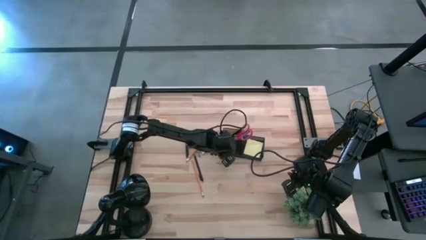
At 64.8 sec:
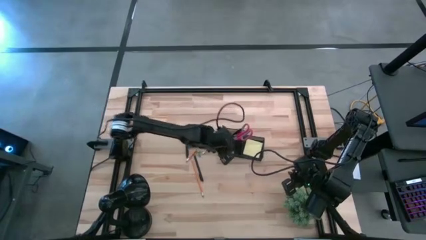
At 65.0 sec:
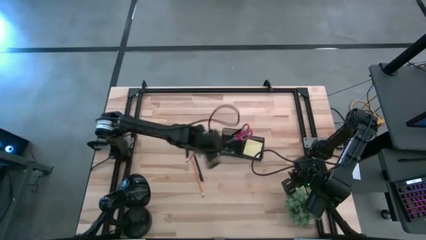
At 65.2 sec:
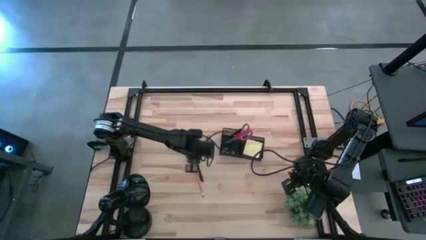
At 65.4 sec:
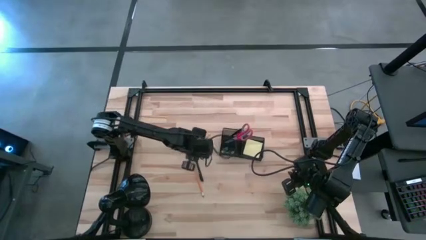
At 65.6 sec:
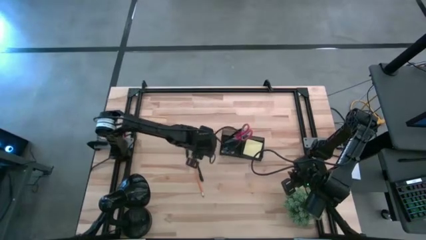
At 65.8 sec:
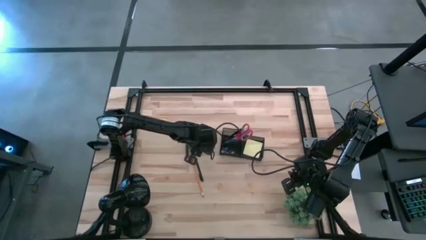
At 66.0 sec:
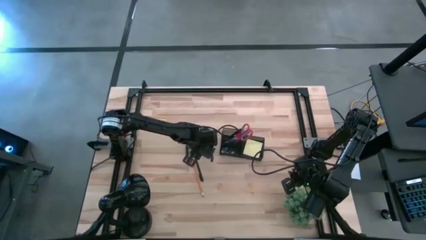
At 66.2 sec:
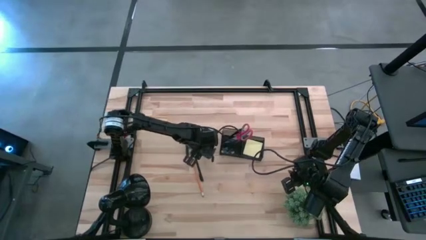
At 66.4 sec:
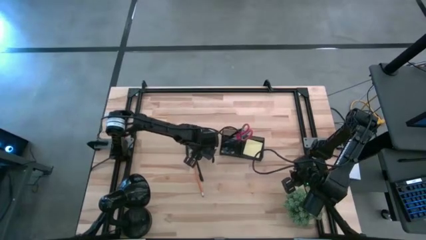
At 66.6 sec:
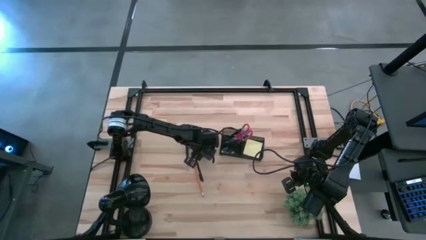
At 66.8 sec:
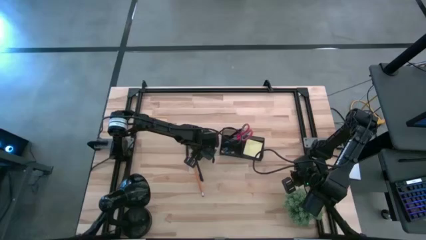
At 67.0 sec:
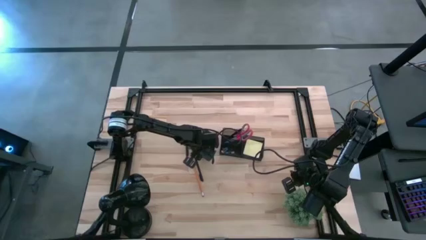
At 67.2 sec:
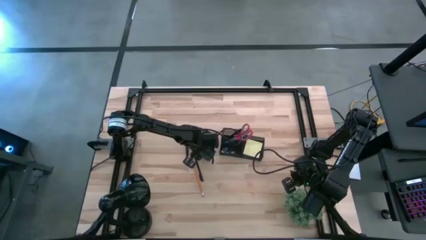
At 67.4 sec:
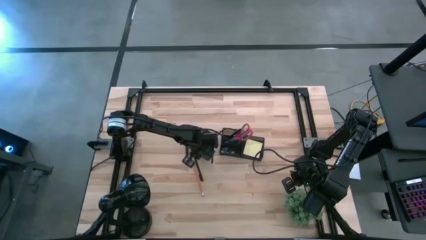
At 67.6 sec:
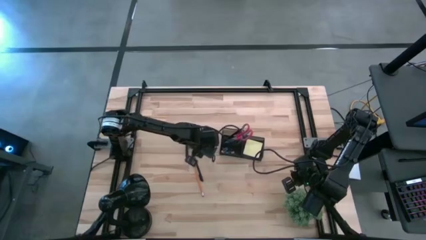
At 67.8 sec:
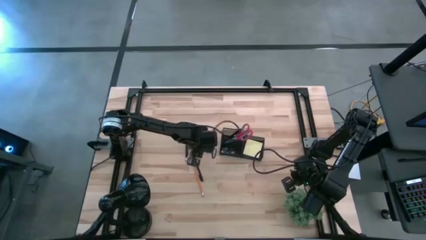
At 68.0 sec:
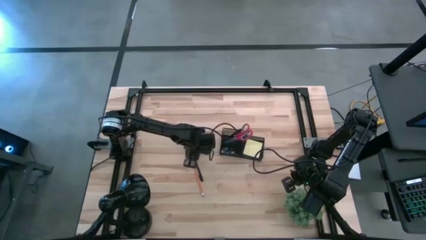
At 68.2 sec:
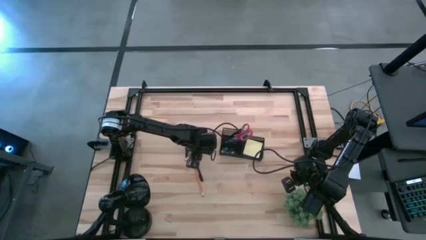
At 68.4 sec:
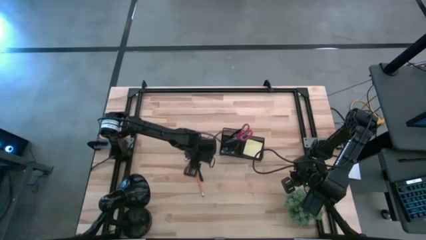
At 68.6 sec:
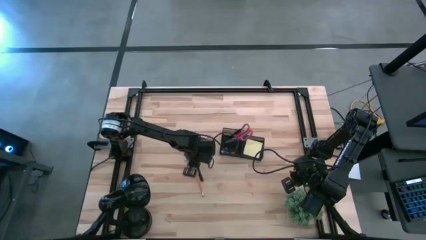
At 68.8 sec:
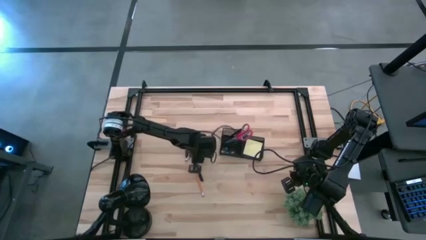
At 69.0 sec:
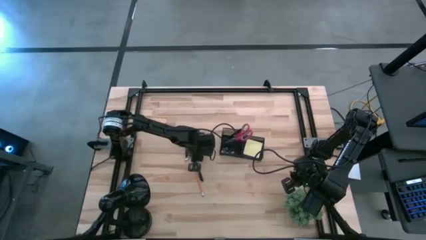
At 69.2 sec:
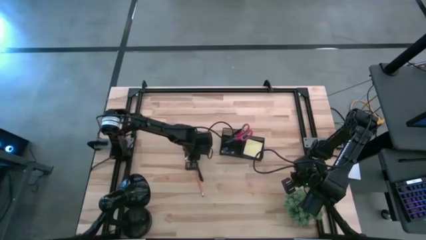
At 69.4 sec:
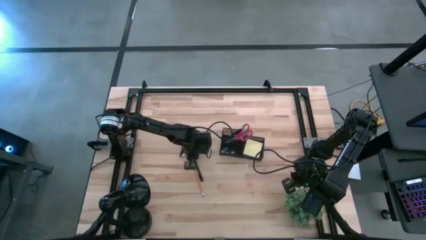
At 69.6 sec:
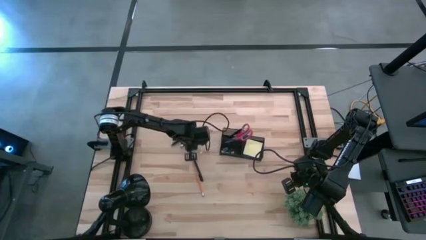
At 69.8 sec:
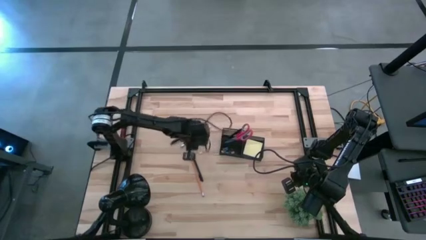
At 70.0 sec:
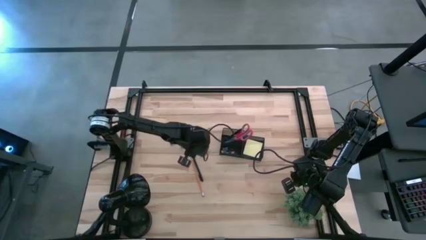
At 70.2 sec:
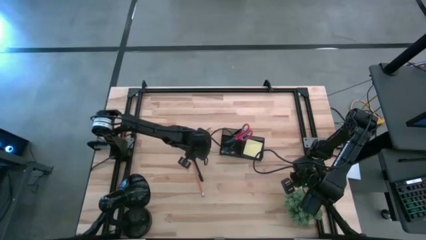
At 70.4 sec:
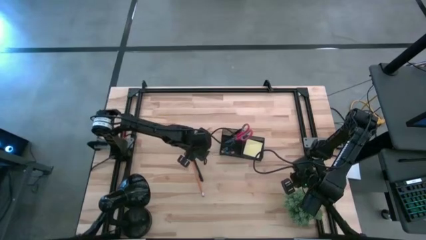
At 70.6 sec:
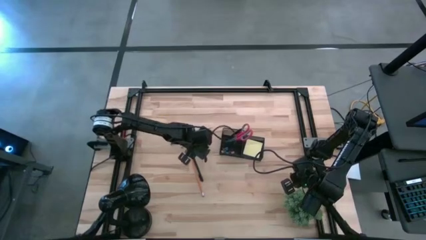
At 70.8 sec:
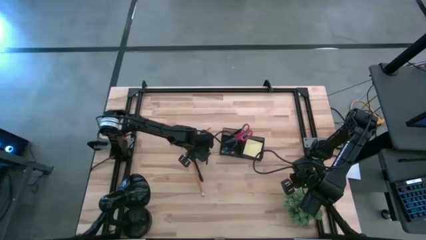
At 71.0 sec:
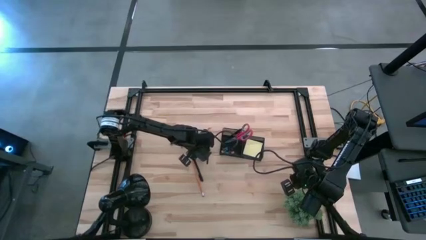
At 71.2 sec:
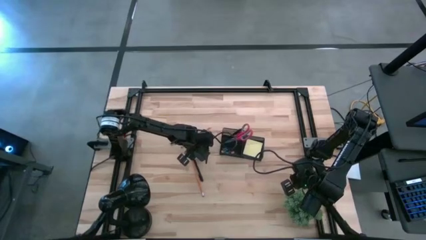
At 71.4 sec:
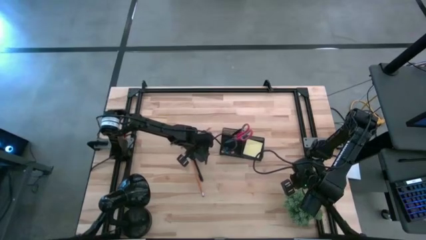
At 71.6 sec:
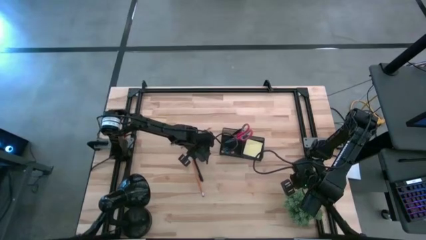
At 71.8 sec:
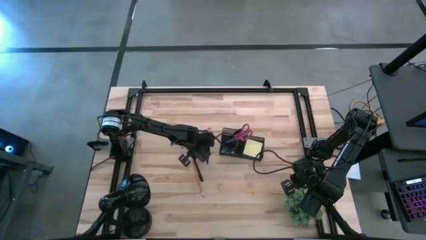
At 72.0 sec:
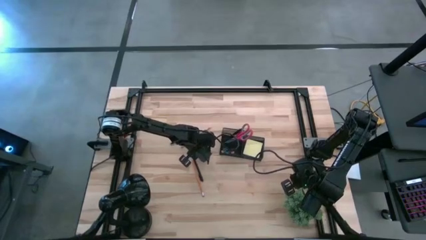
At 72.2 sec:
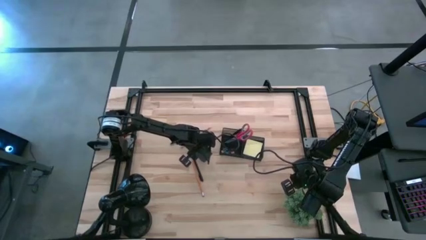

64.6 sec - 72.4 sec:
Task: Pick and place office supplies into organizer
Put the right yellow binder clip into the desk organizer

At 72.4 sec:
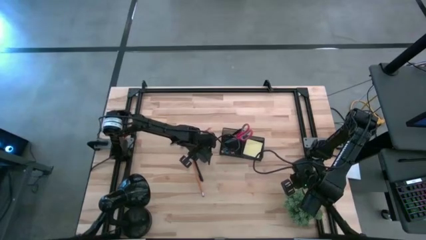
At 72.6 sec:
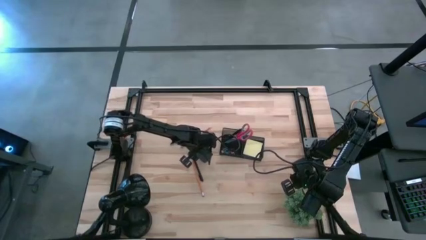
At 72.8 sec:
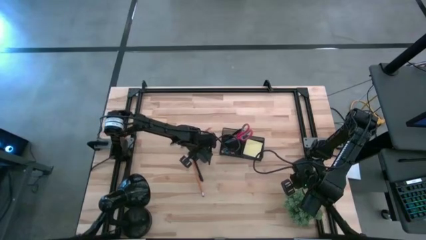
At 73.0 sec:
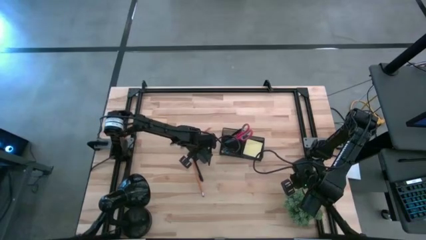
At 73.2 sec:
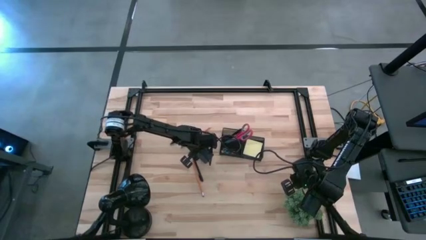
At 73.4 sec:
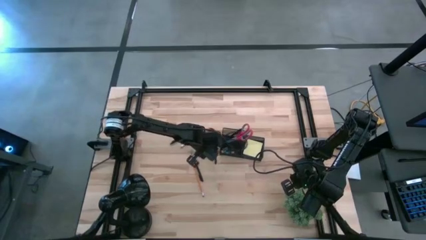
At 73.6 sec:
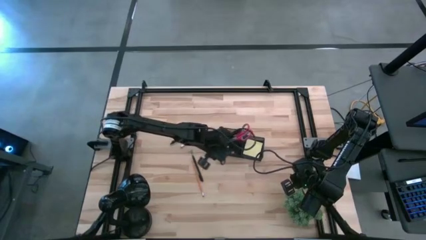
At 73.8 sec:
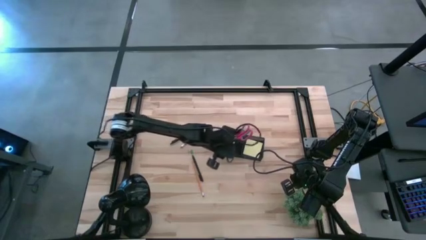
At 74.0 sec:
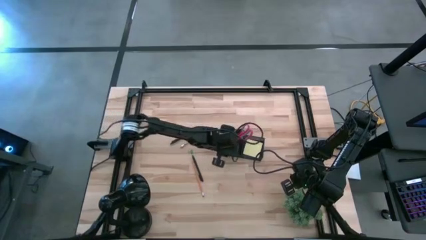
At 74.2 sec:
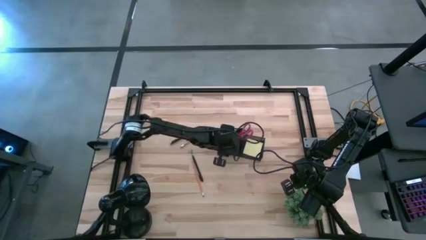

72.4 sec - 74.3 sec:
Put the right yellow binder clip into the desk organizer

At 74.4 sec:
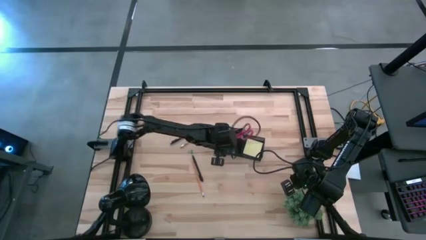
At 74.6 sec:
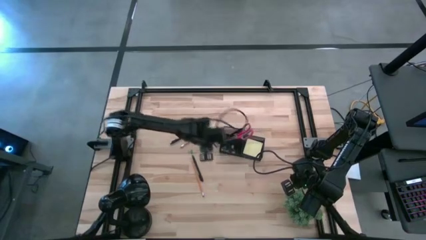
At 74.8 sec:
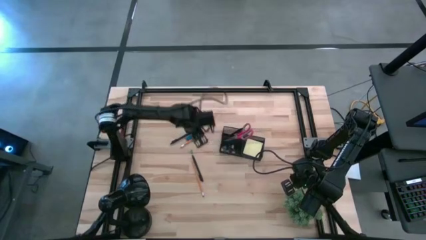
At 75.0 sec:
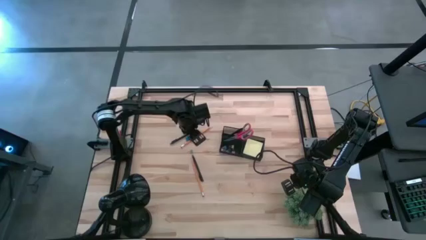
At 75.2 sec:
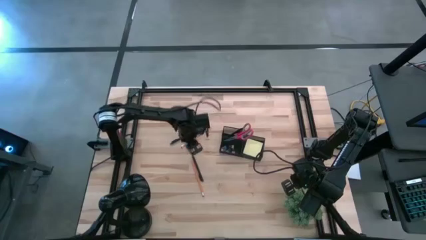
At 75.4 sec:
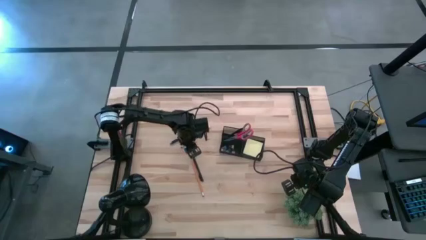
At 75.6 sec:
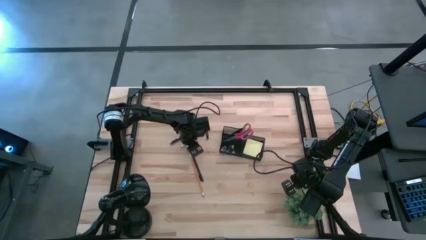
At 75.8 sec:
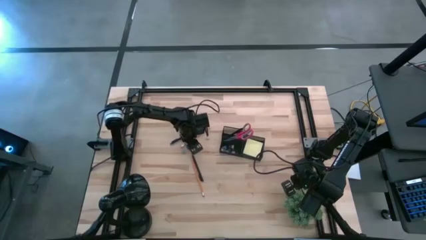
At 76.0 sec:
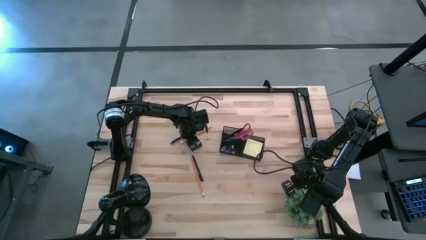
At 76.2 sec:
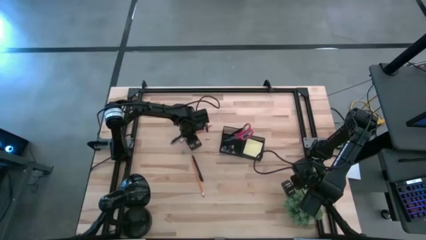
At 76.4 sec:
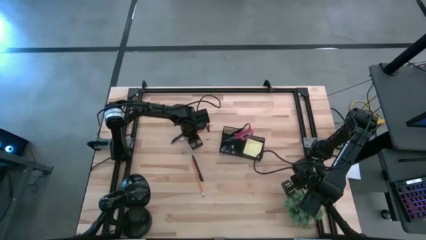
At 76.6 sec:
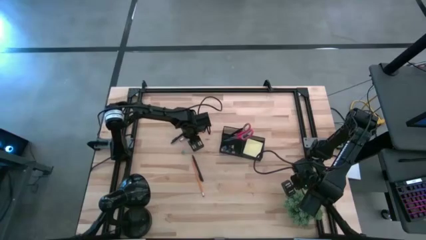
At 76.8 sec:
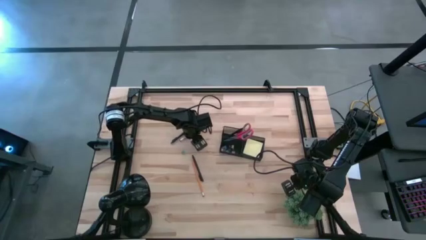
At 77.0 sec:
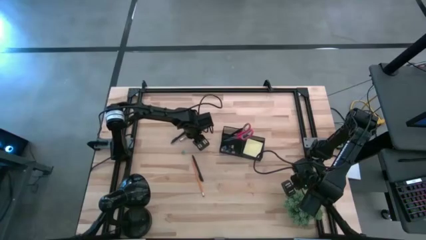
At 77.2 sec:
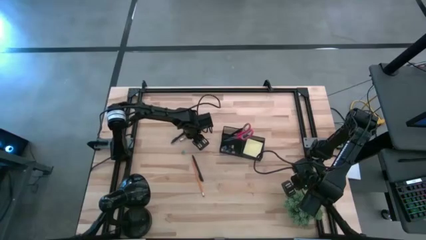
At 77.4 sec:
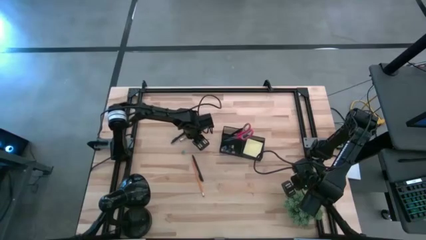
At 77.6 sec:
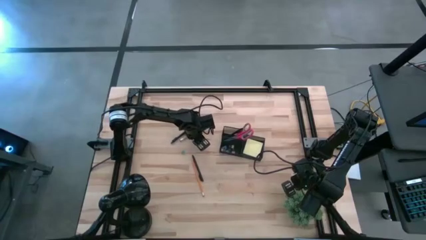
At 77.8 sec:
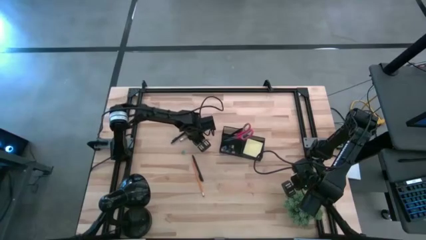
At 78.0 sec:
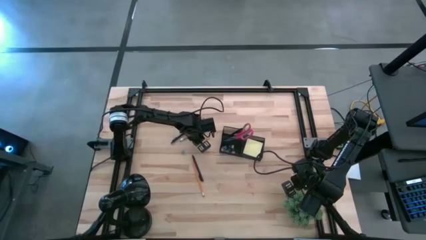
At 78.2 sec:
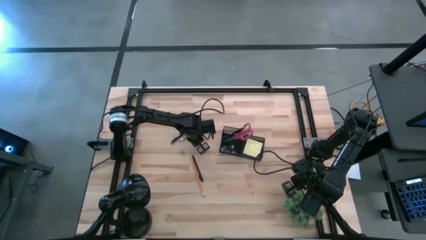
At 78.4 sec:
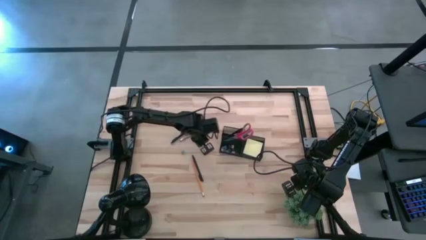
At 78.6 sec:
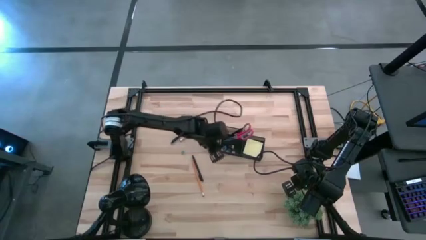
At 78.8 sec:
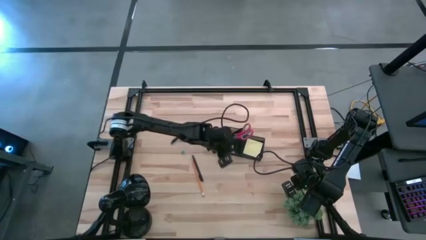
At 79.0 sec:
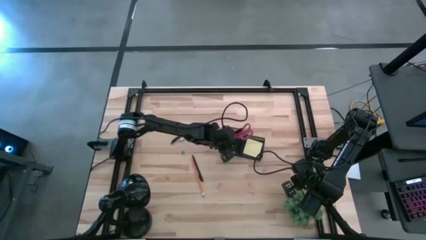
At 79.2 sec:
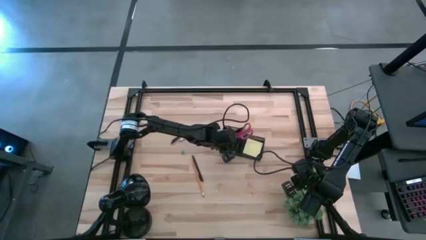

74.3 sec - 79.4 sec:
Put the yellow binder clip into the desk organizer
